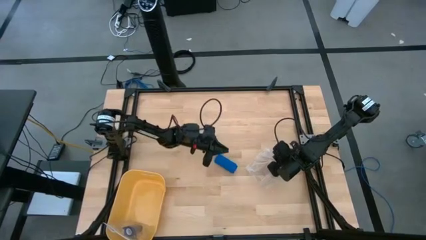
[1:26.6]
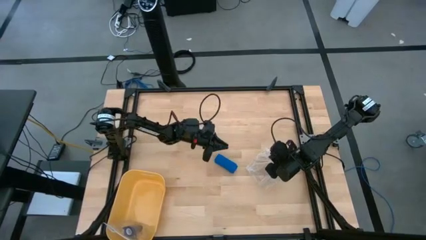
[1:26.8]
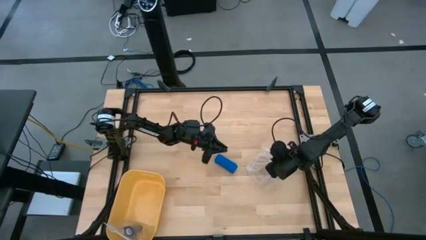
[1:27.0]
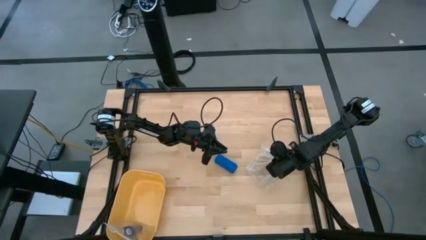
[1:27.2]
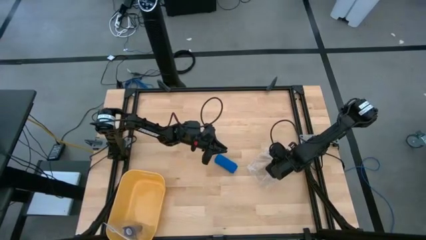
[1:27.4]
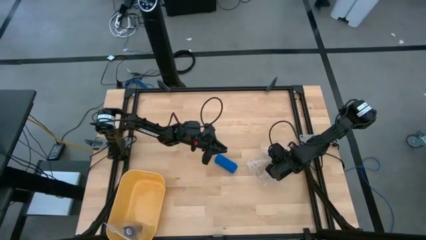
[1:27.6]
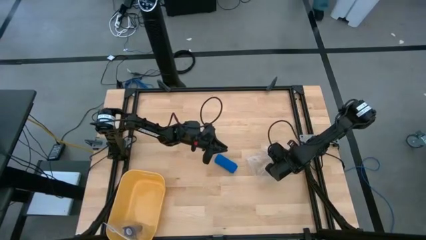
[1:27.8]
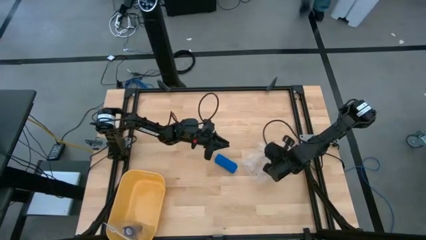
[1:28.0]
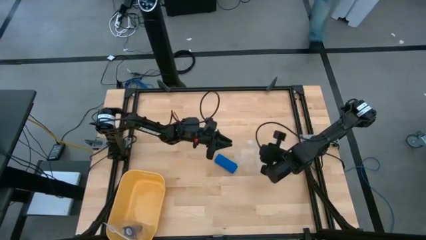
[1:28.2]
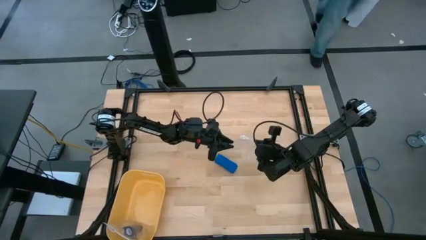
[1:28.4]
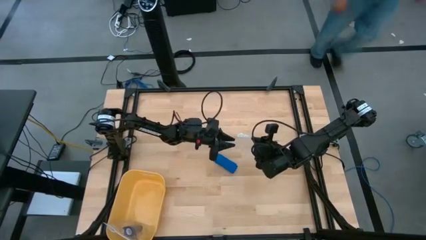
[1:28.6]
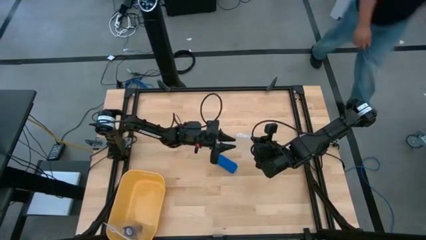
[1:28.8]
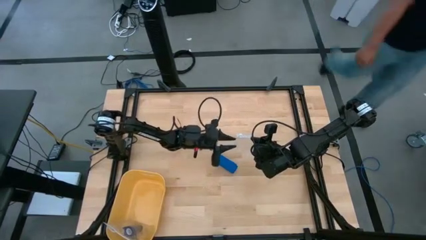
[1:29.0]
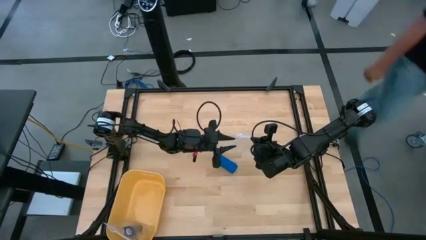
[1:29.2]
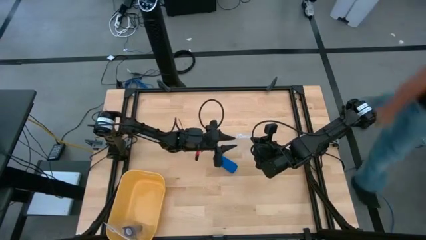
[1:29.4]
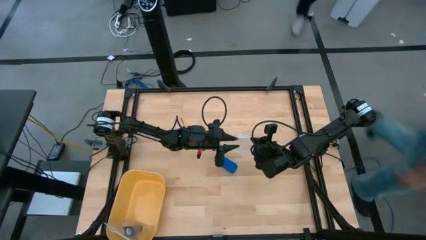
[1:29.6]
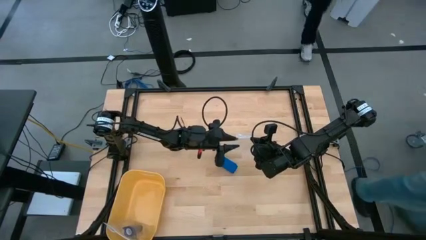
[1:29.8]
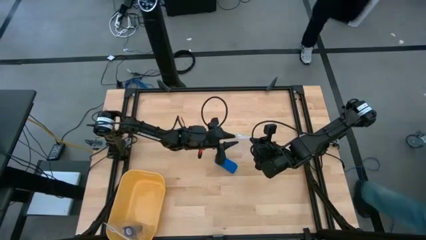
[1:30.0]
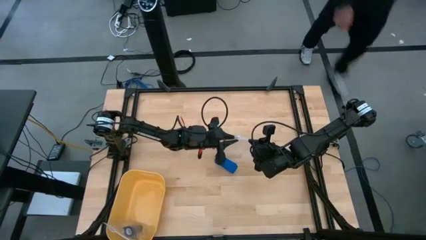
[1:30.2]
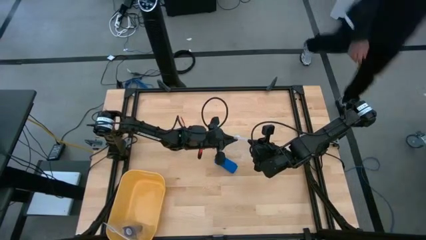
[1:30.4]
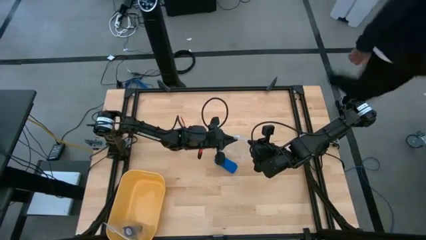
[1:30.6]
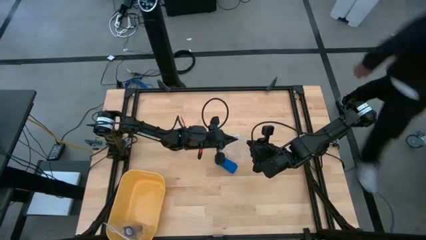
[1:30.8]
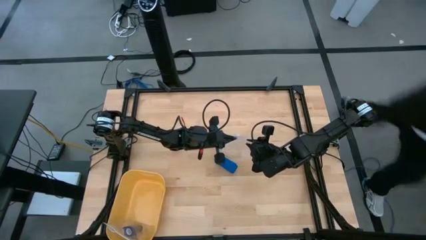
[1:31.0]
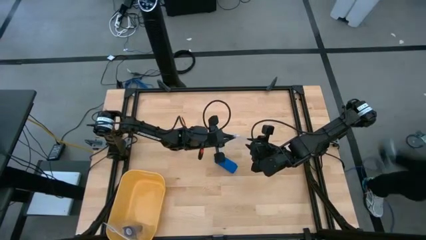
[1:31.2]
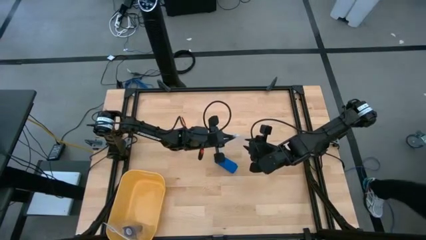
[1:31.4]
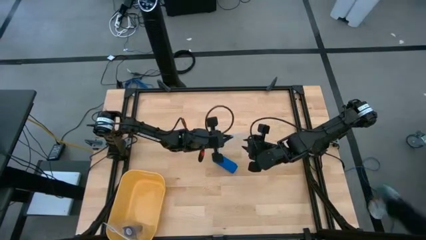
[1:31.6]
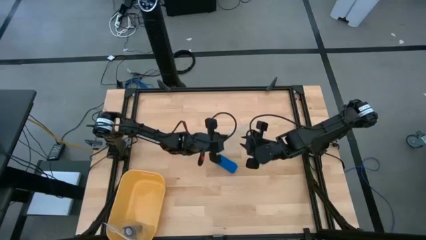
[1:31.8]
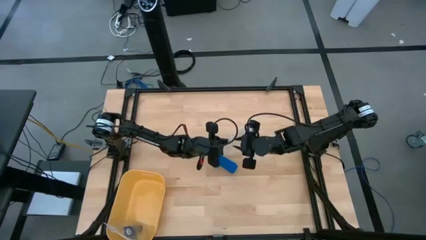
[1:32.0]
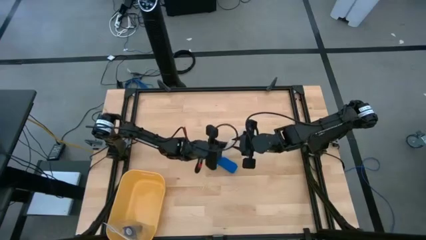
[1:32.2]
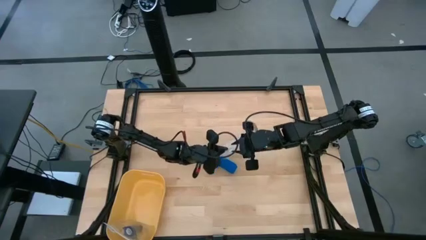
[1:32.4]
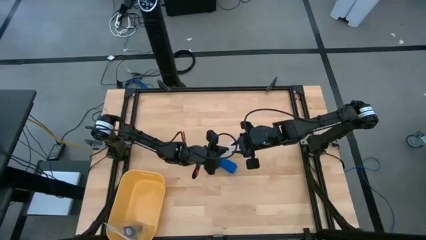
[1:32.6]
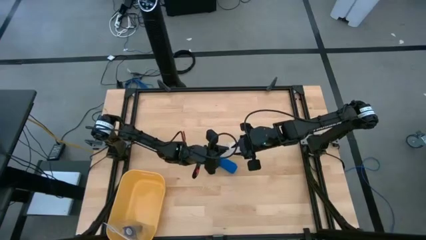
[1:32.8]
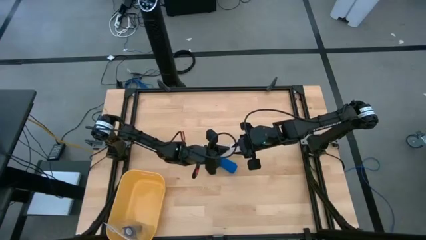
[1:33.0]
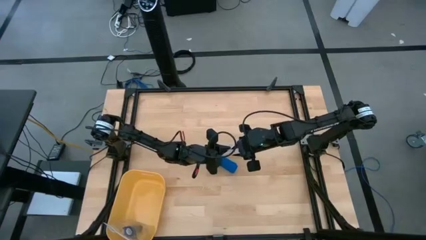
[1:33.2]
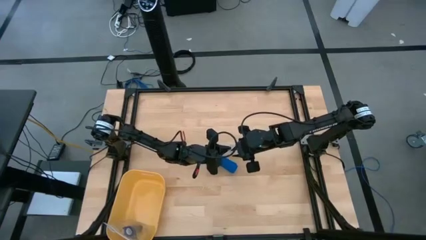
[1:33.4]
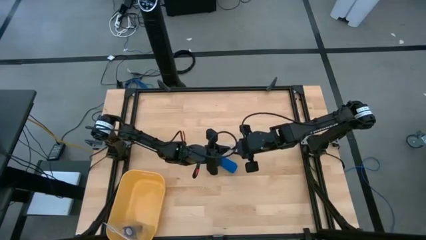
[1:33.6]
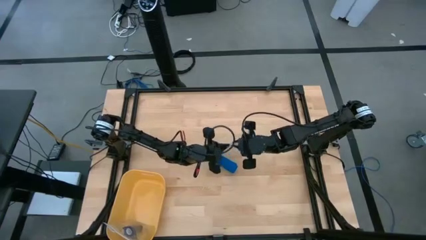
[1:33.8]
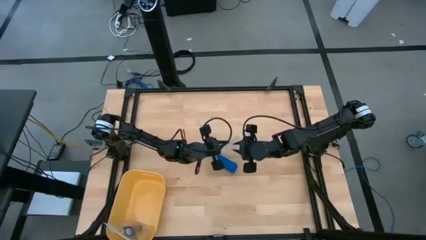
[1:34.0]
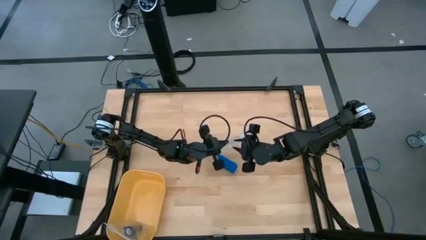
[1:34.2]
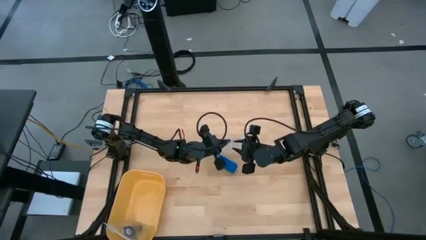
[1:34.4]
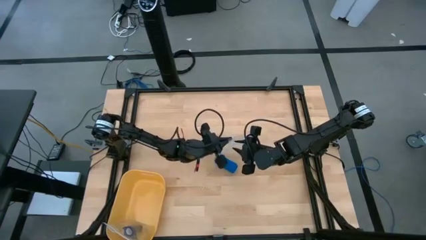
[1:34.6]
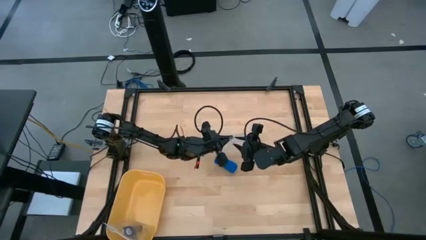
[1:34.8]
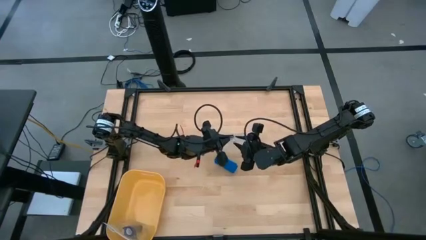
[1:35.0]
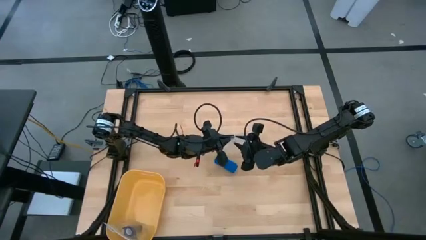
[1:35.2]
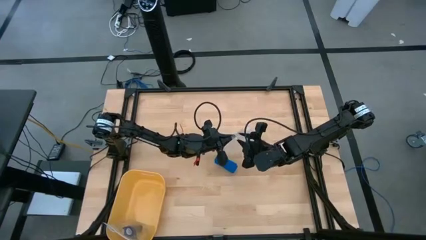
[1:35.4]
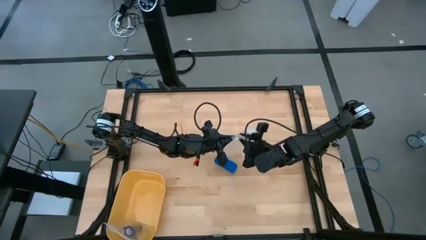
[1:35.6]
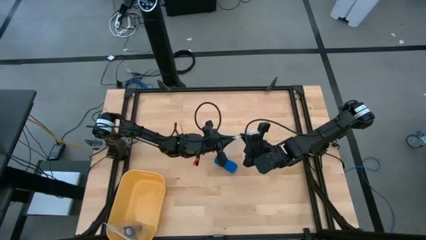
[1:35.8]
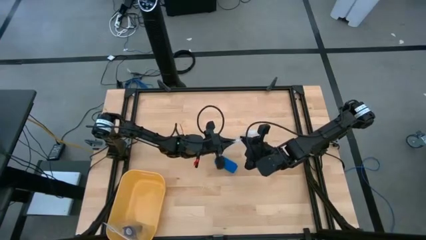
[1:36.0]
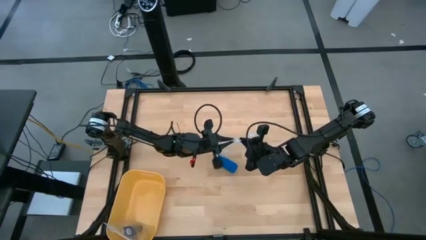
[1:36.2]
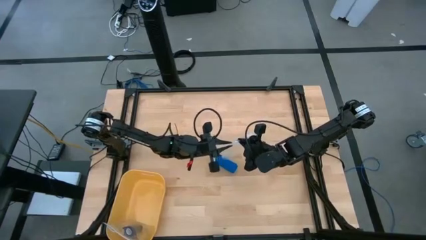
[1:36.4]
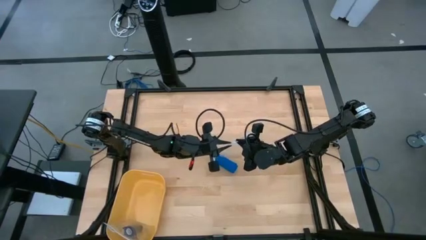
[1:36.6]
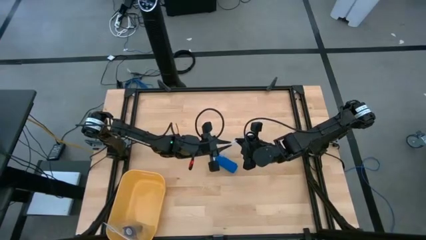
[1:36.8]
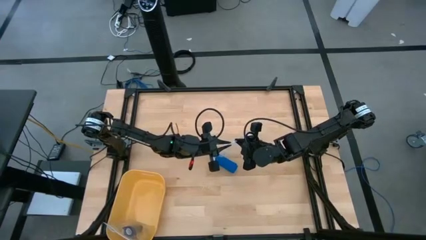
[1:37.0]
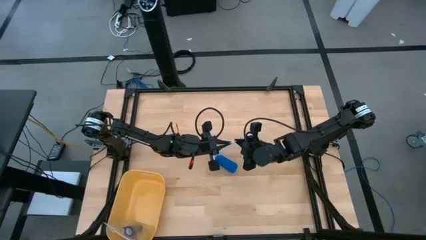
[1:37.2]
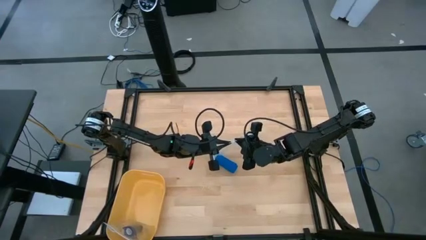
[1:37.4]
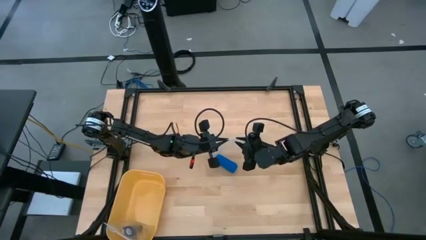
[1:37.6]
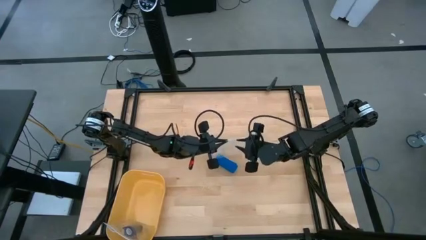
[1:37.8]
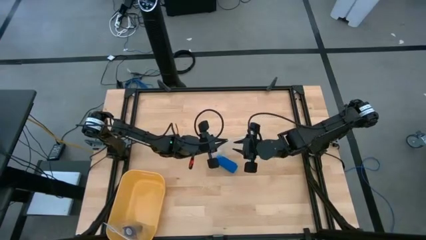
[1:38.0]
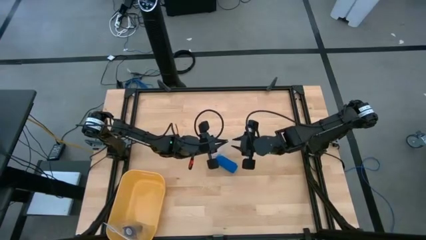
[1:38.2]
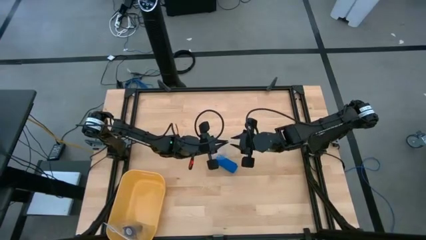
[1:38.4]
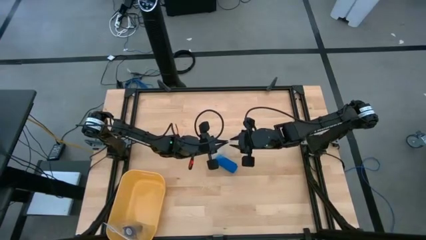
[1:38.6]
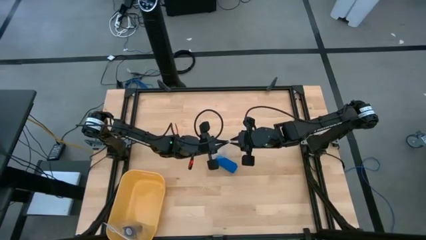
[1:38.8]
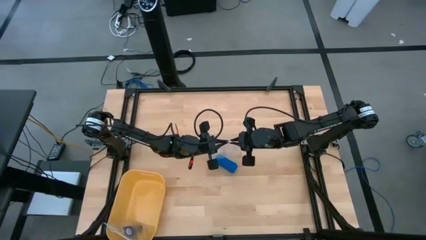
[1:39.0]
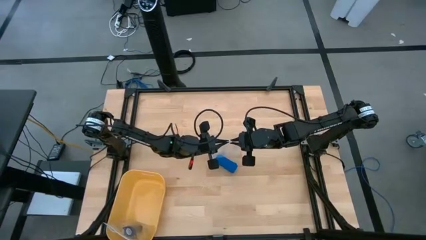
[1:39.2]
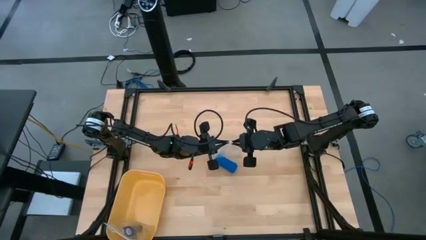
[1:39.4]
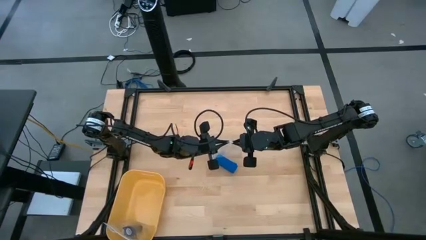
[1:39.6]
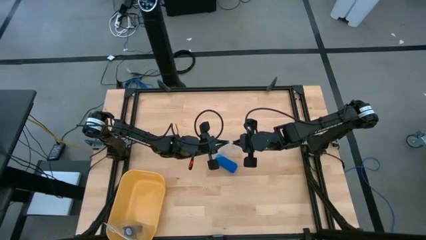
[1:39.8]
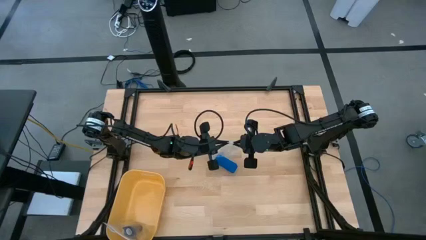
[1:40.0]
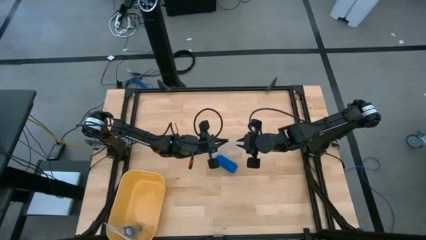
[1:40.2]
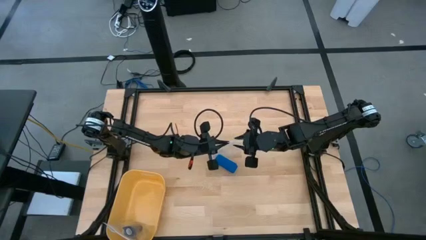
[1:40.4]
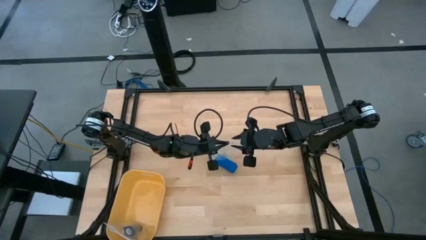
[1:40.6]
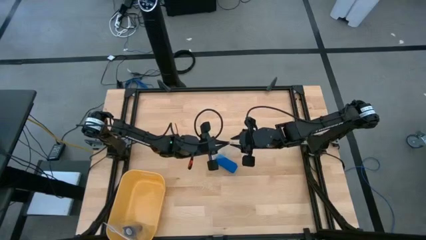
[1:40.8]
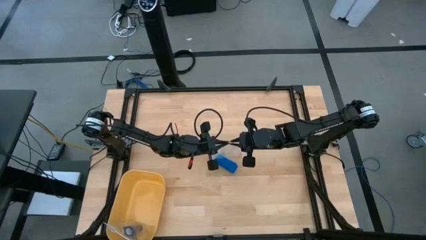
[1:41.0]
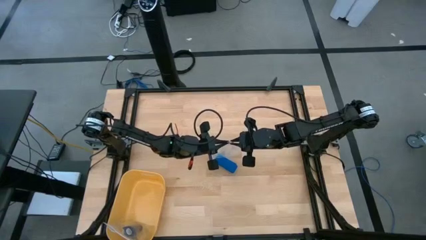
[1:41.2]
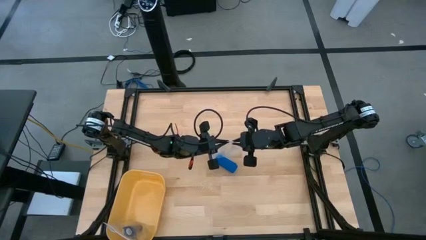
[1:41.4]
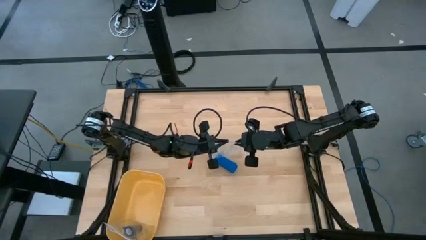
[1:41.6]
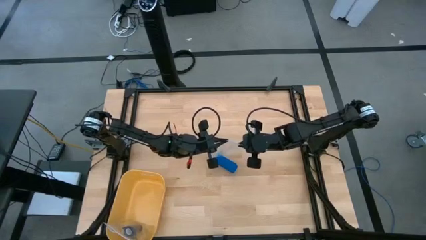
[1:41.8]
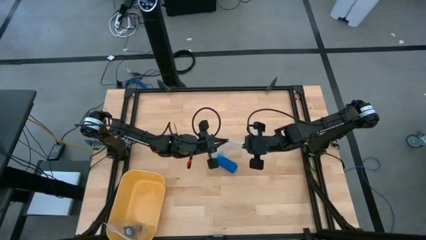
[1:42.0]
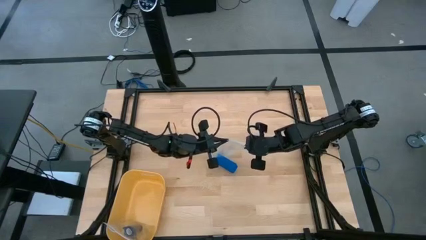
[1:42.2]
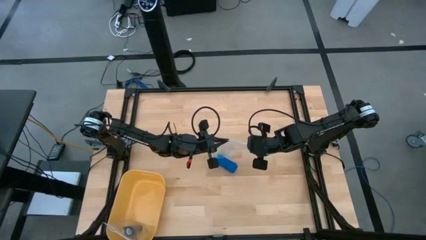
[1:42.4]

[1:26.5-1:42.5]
Task: Roll bandage
Open the zip bag
